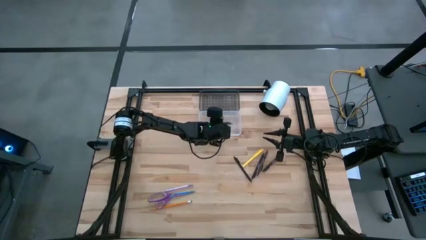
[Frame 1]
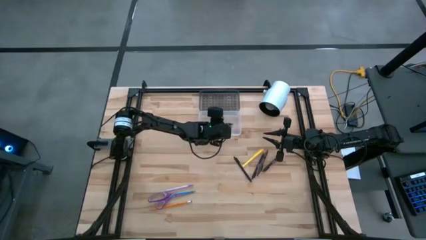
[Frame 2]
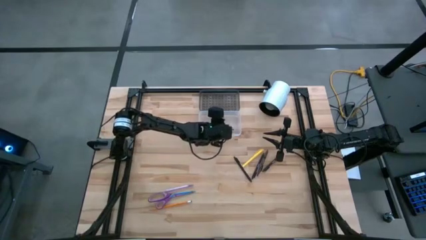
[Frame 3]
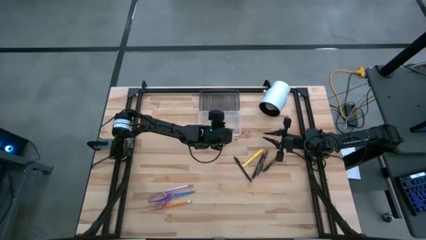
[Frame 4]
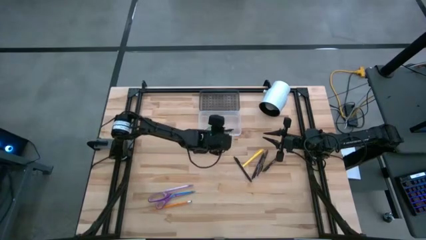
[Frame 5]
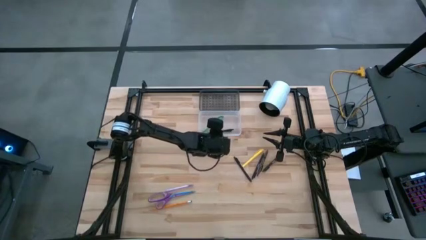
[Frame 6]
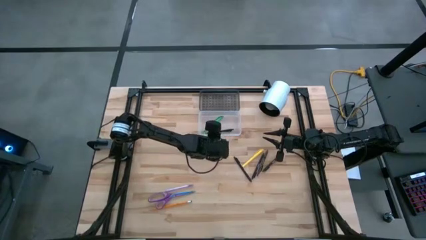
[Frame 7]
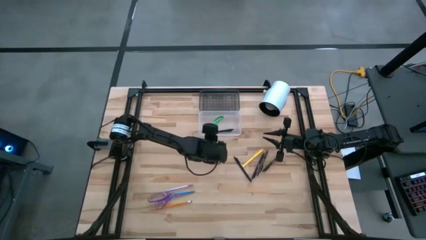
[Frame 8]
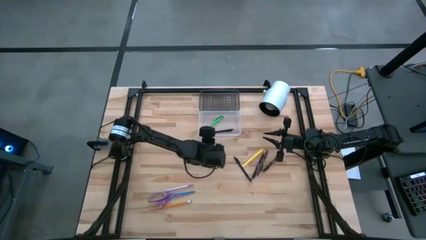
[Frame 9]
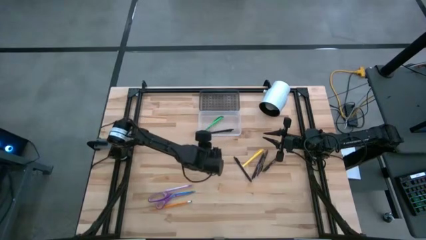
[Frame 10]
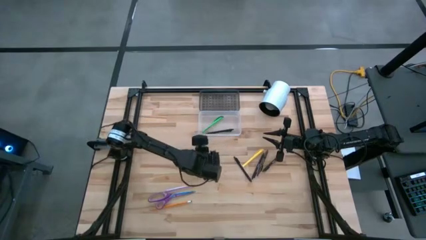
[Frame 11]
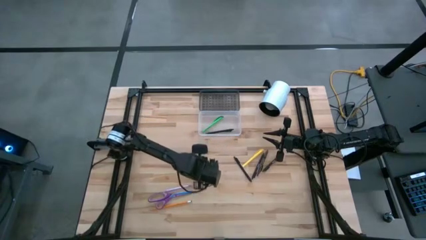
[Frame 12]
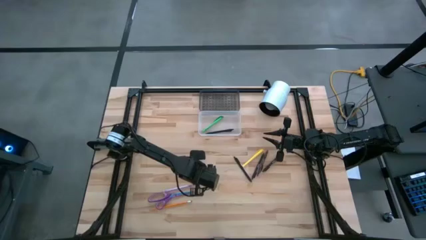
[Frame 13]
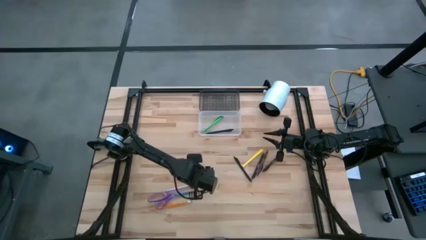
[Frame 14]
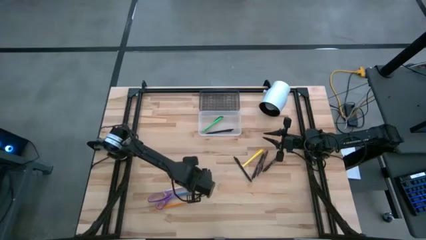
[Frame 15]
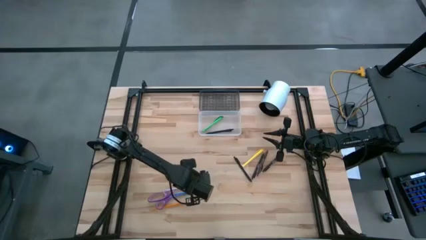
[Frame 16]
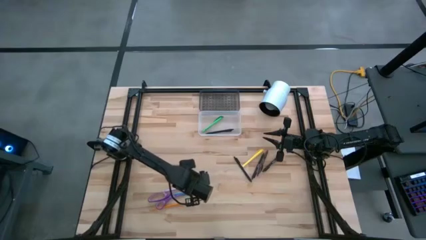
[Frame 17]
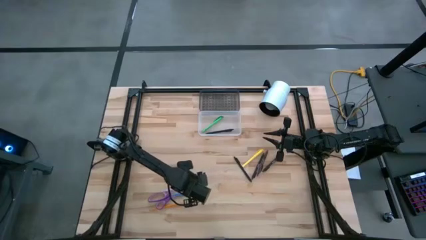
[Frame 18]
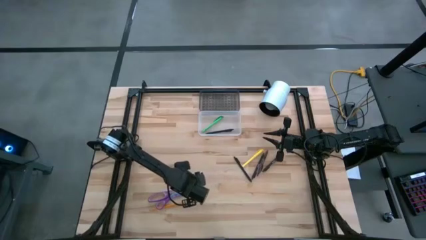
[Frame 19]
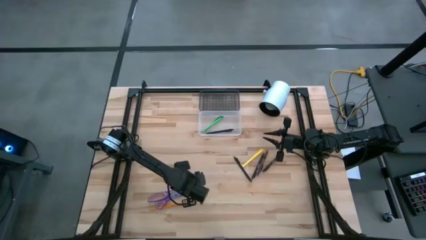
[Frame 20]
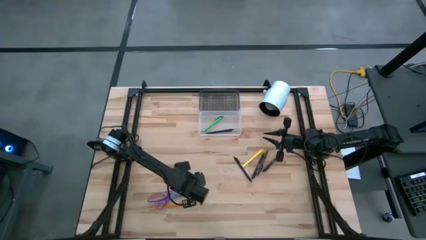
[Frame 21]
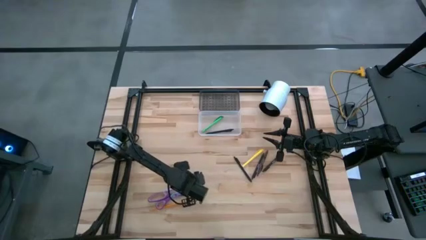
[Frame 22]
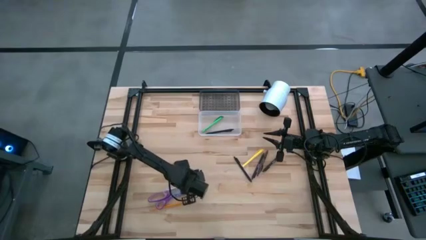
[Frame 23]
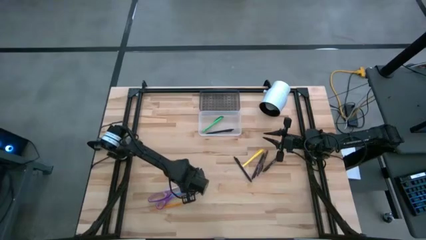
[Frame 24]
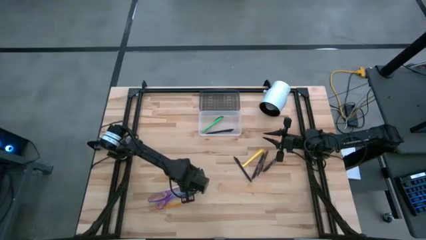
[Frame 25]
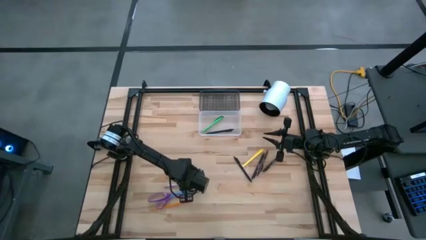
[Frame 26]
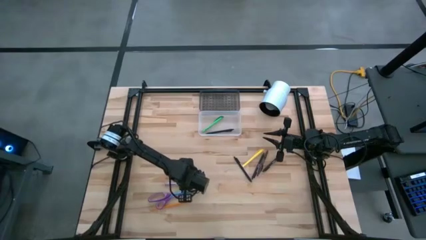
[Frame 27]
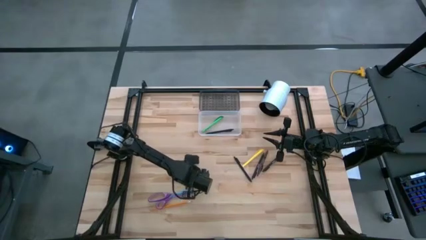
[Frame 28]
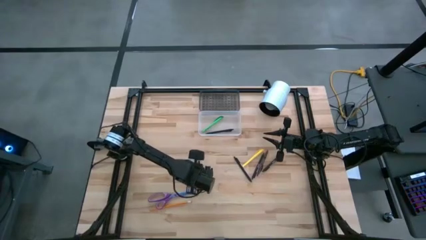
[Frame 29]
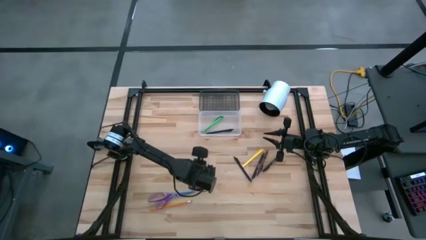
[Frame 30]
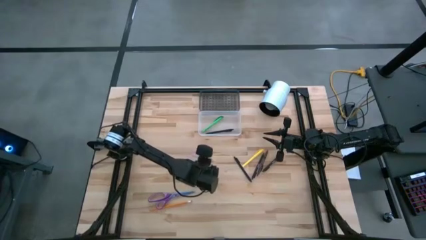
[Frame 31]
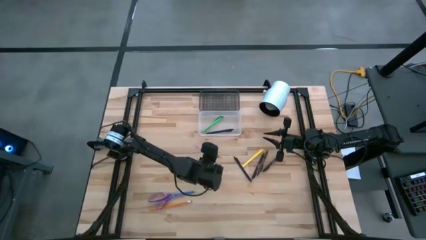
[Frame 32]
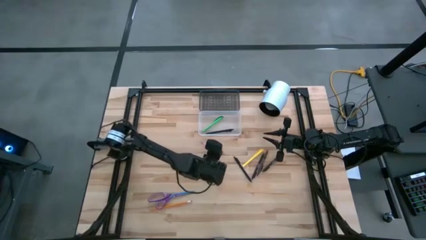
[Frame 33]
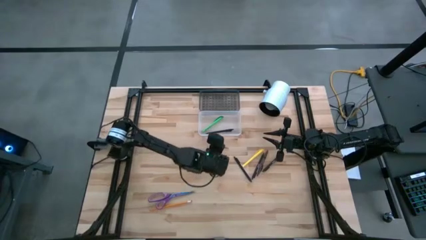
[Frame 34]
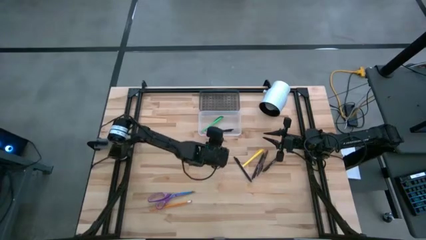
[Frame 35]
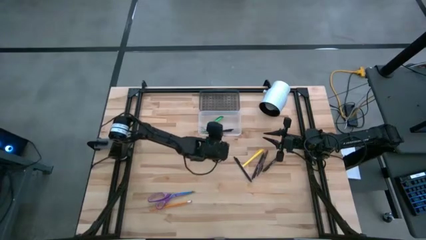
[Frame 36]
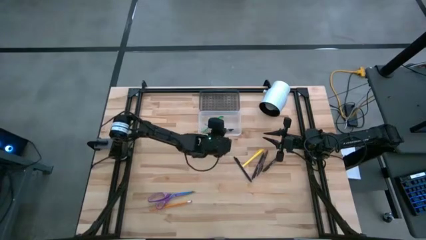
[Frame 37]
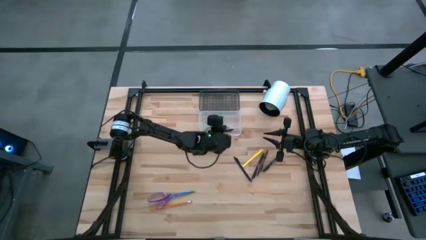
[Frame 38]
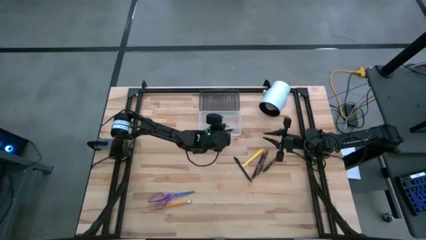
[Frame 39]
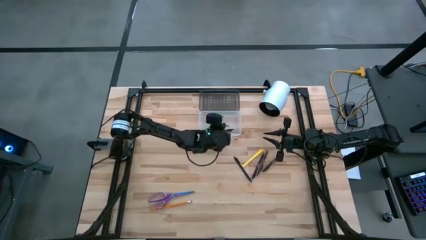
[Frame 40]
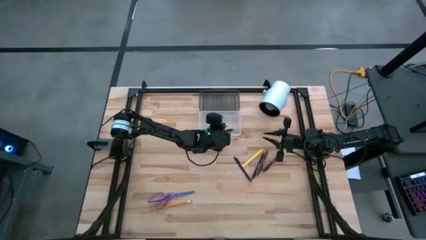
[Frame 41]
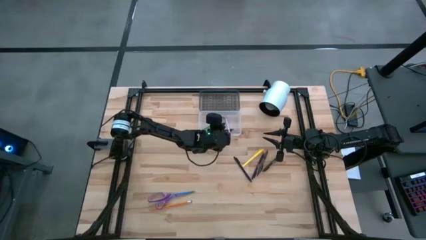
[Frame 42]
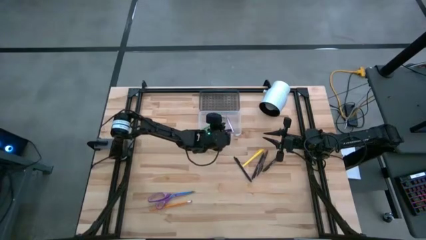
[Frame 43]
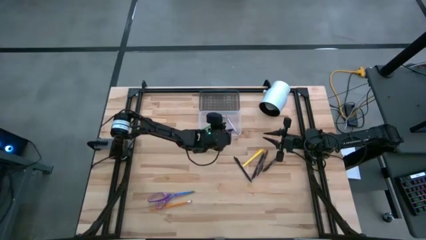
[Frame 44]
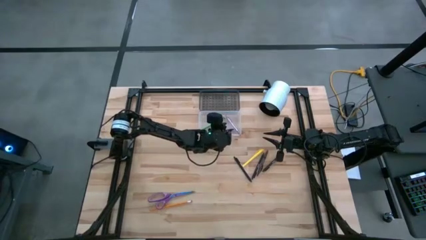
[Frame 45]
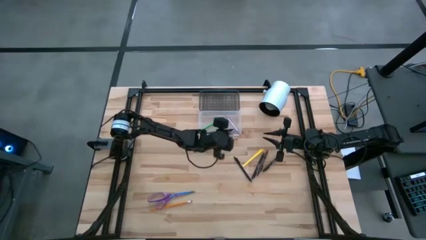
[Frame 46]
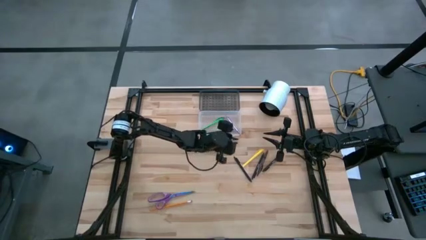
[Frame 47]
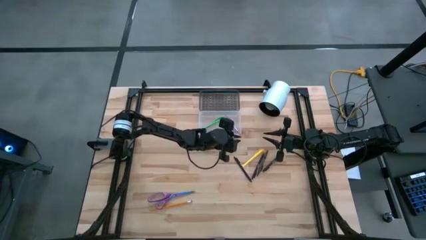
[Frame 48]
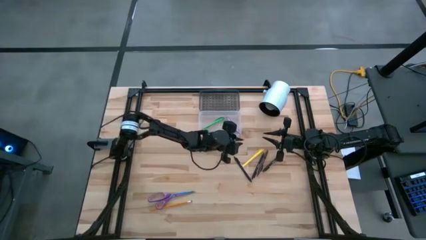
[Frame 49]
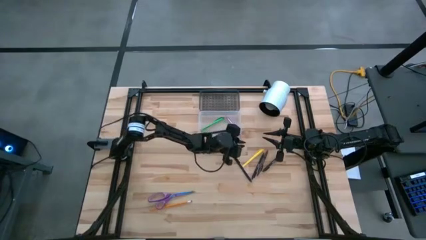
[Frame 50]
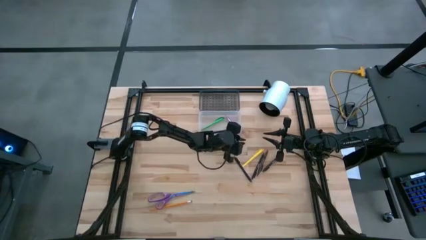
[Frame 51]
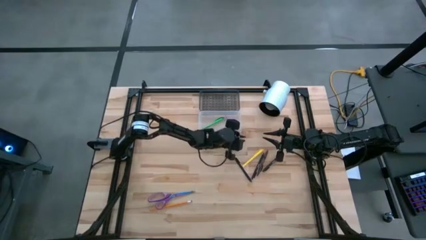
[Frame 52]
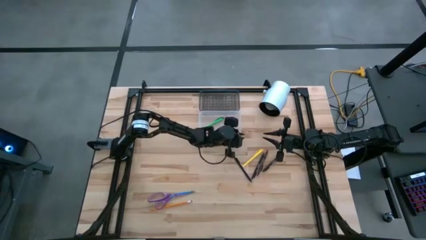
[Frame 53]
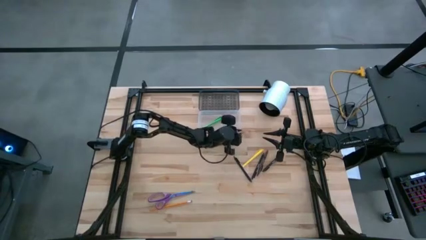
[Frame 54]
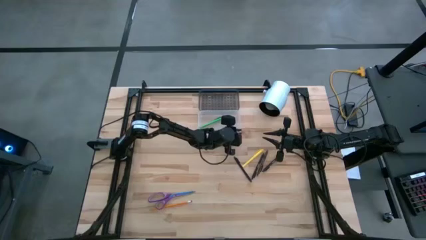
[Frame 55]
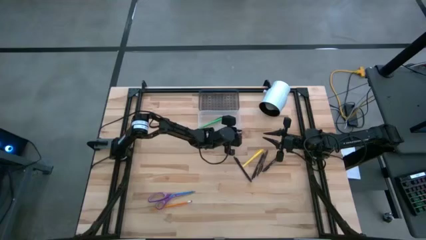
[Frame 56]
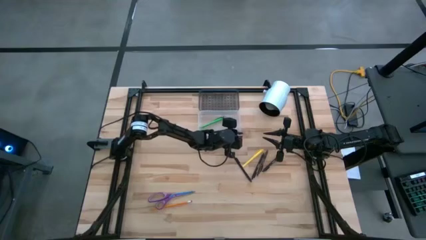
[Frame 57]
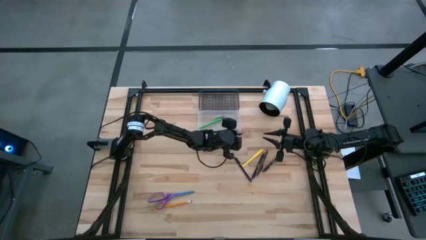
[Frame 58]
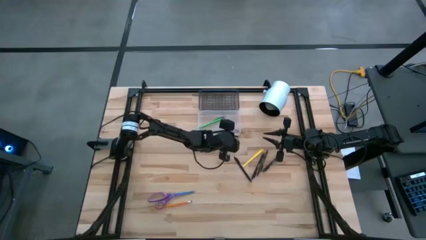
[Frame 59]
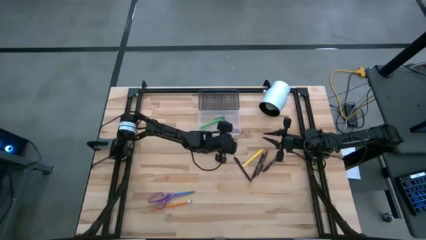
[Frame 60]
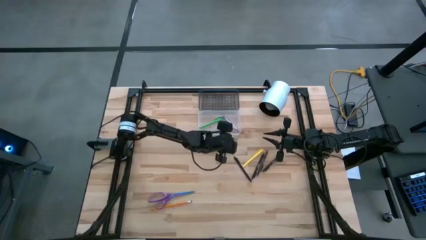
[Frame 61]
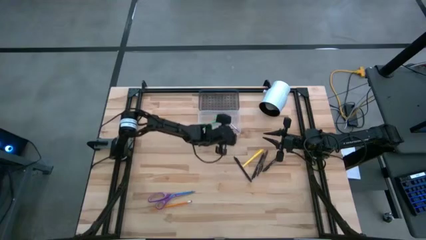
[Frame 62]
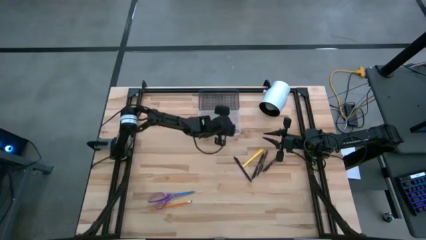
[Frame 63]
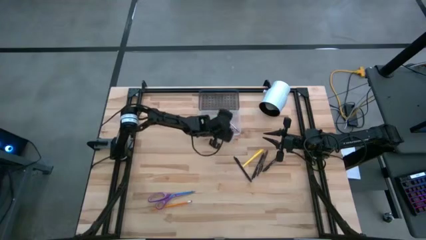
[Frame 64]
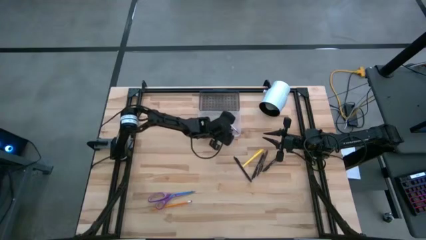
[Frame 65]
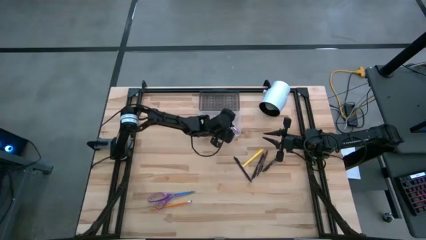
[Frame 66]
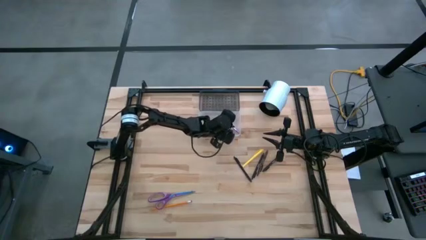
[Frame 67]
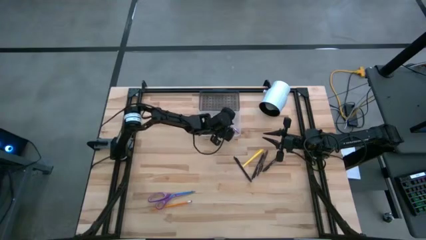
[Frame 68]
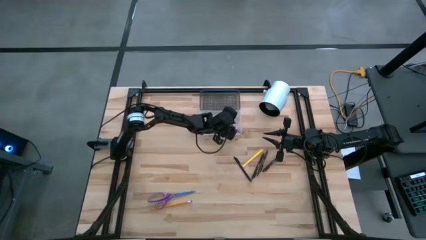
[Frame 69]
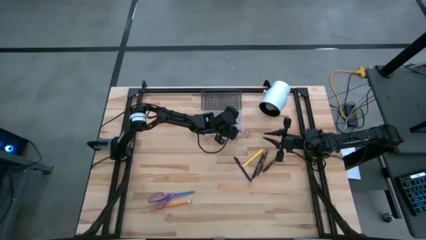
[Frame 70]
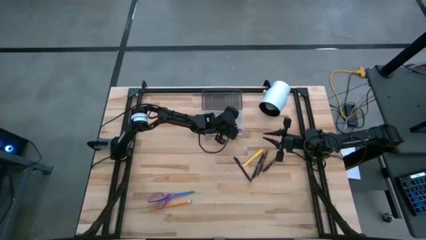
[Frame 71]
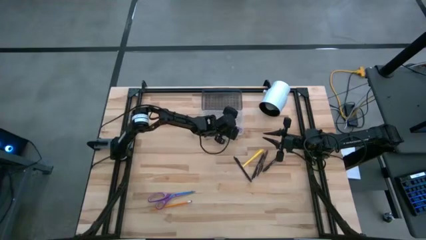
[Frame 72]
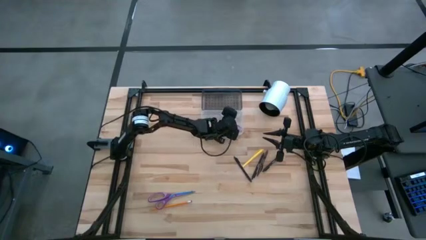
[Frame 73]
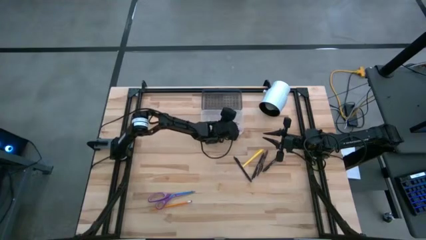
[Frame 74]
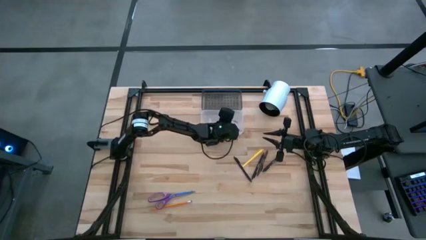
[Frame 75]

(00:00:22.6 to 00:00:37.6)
Task: Pick & place school supplies into a supply box
Put the purple pen into the black box

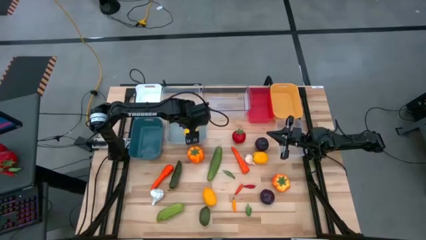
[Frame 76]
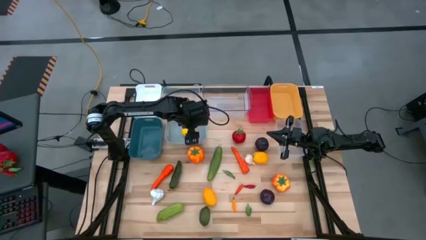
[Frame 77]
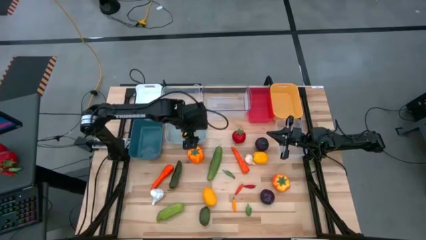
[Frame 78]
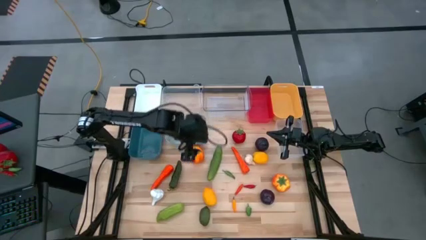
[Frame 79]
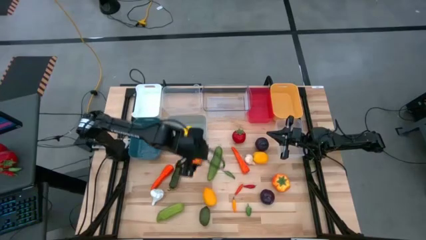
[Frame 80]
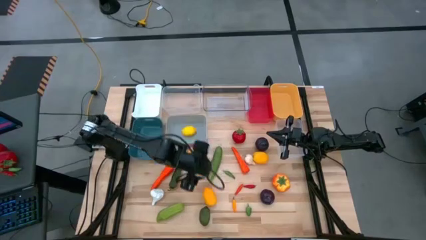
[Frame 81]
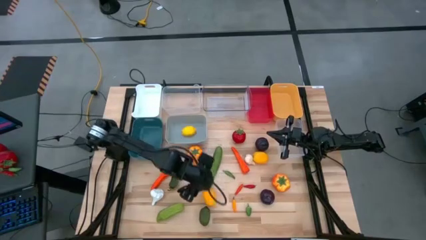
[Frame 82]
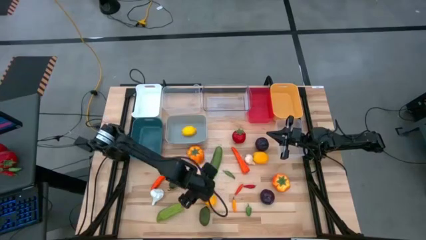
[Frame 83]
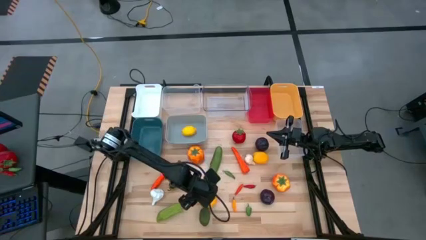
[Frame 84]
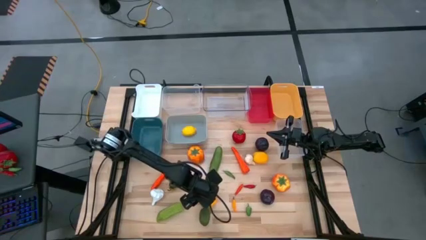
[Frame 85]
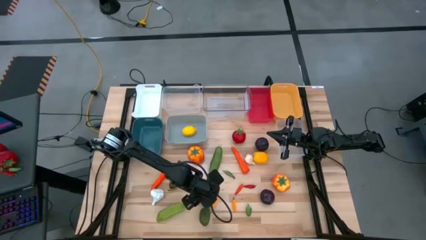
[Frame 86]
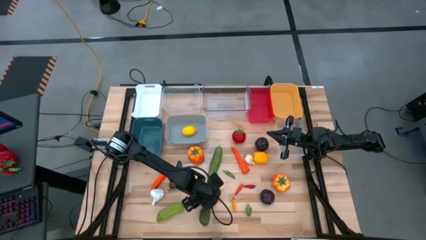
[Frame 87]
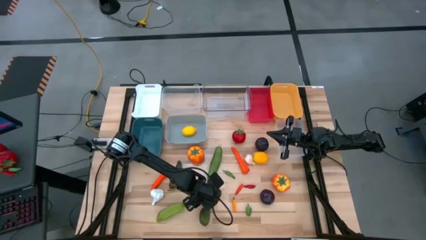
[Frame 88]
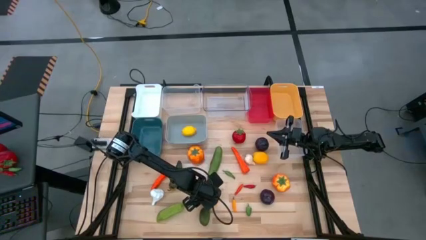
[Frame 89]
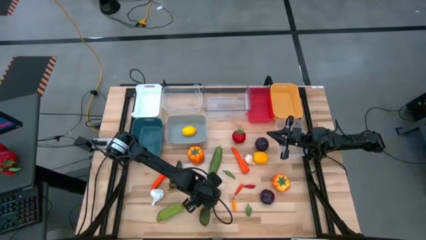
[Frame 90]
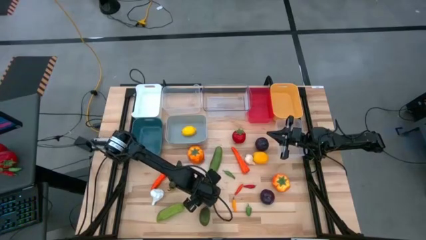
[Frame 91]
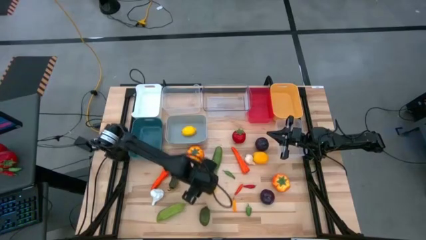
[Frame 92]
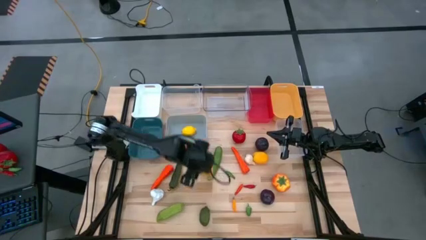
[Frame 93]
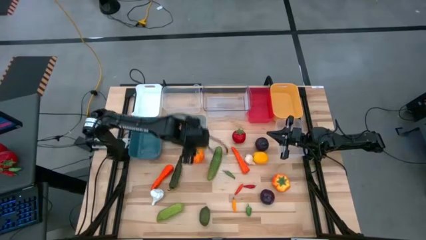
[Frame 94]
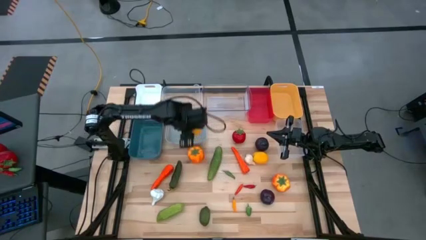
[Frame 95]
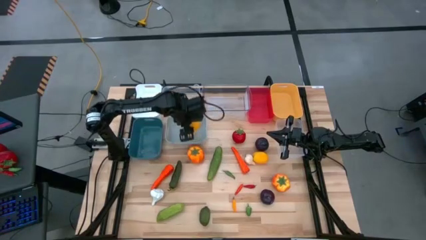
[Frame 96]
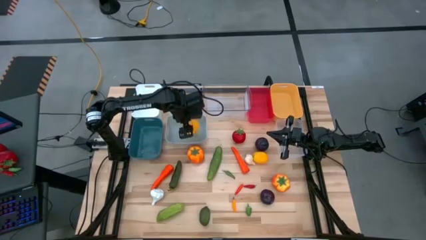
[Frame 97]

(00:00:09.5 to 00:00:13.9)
Task: Sort produce into baskets
Put the bottom lemon into the gray bin
